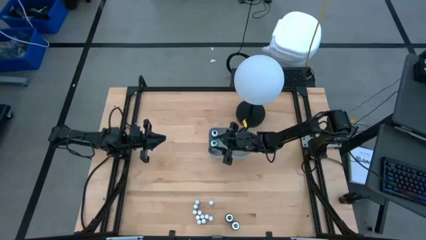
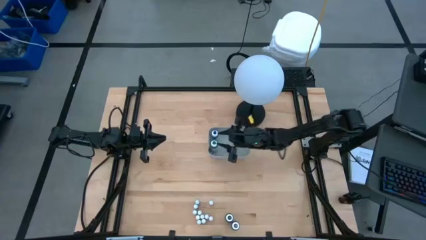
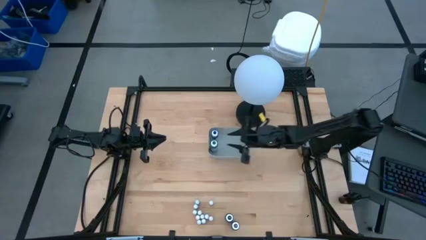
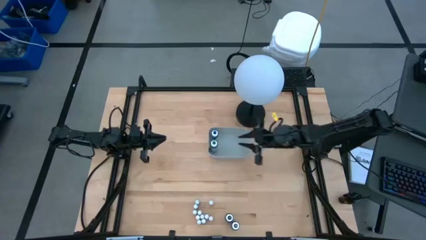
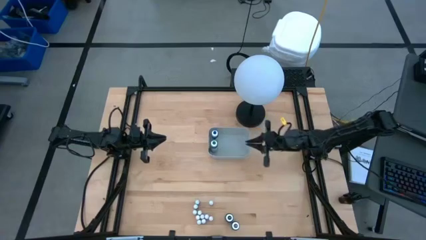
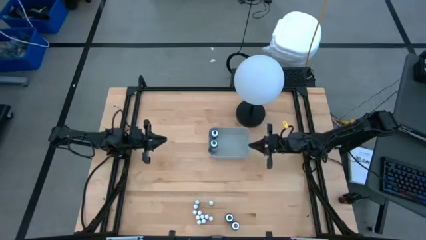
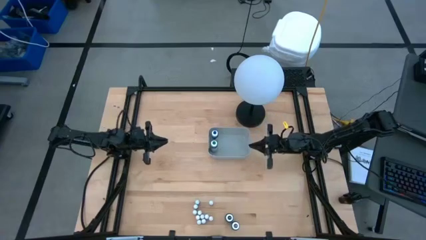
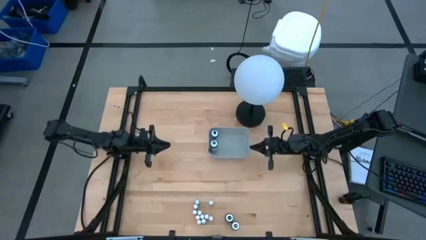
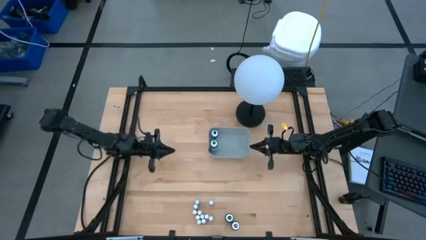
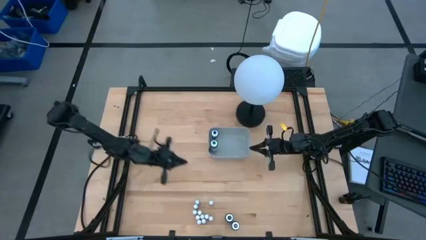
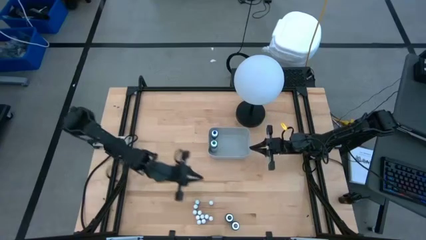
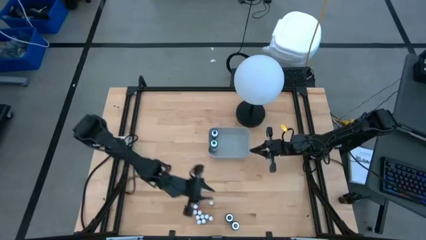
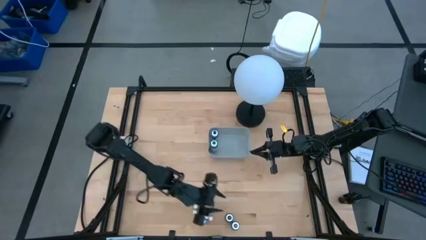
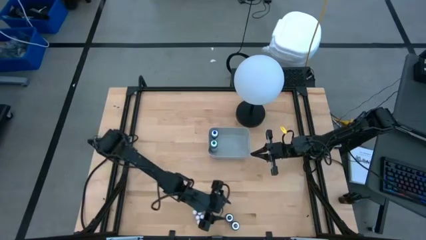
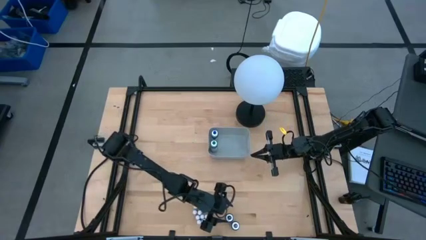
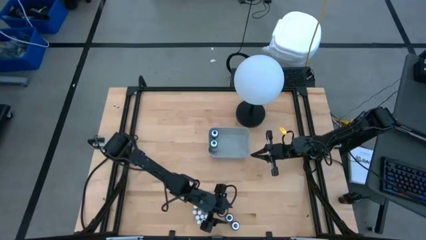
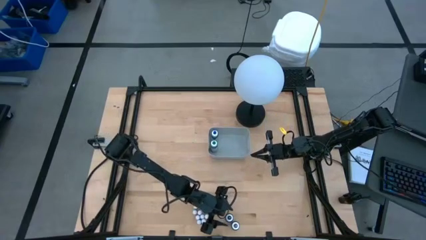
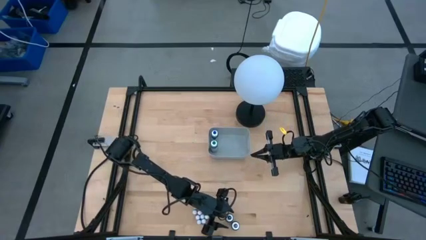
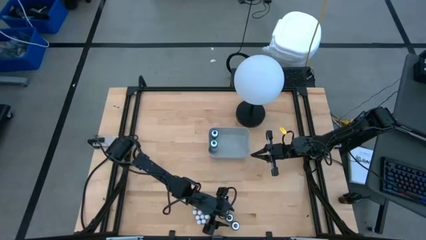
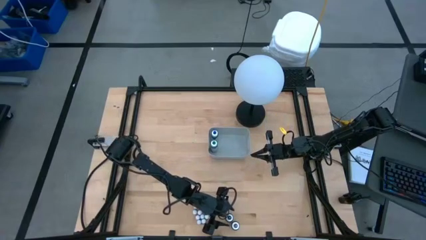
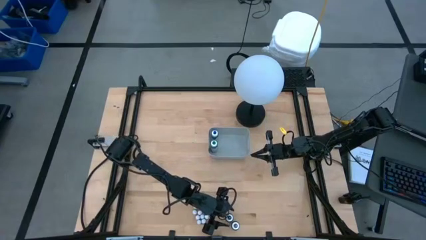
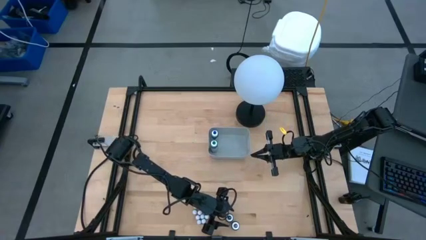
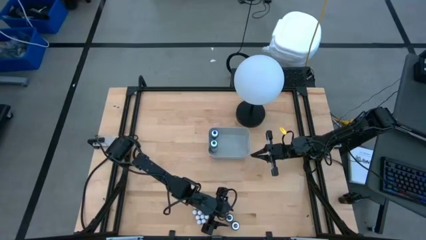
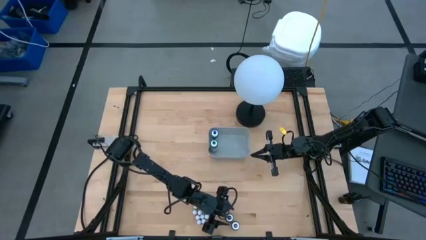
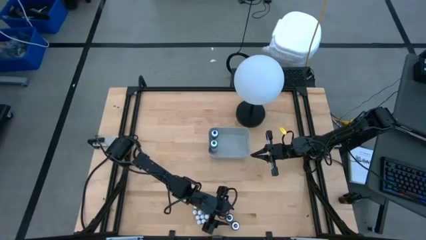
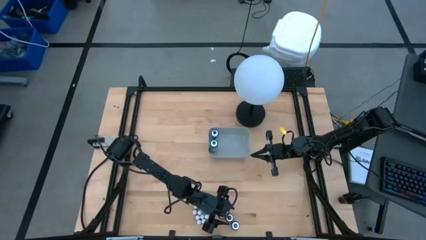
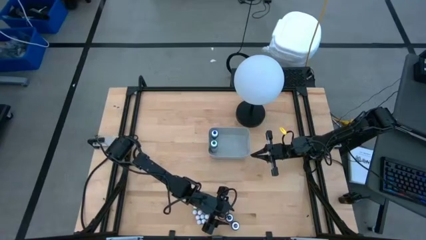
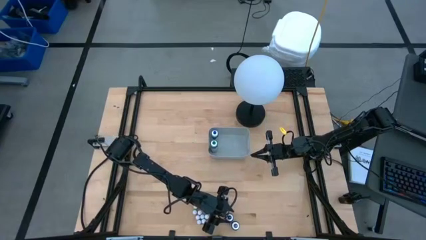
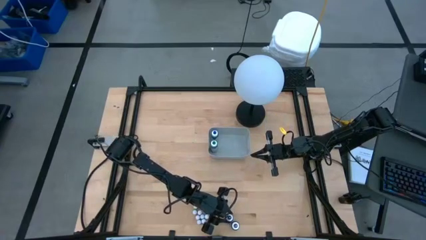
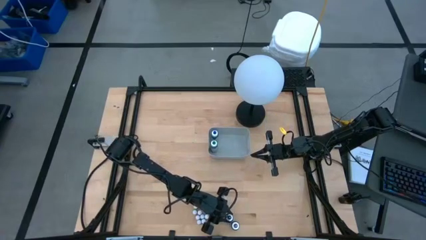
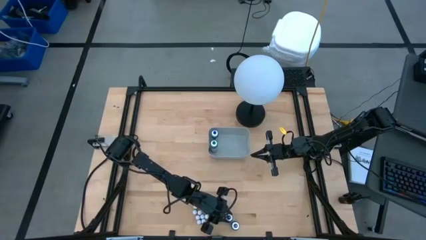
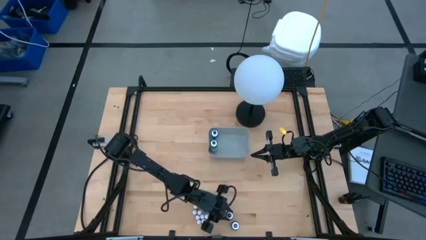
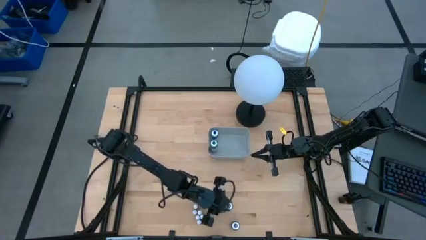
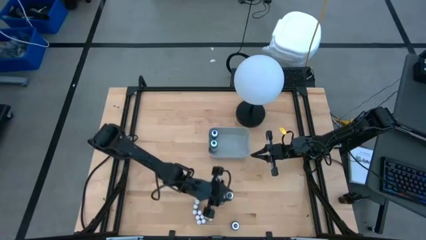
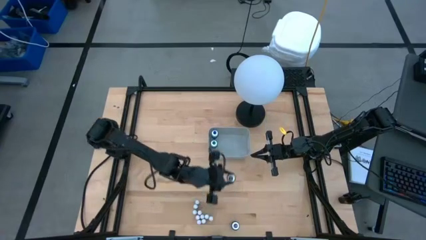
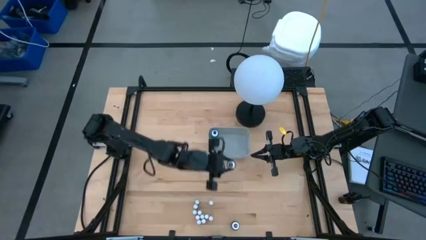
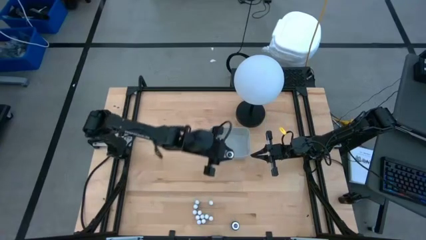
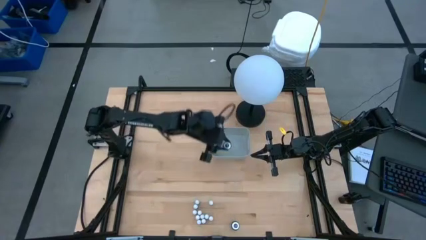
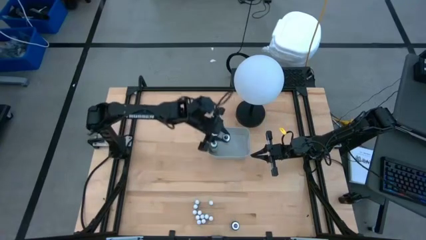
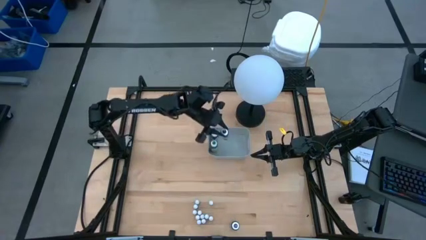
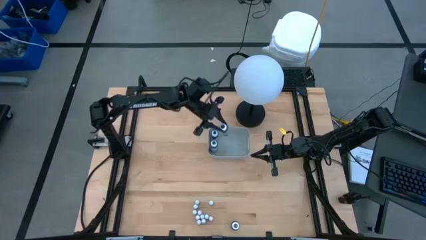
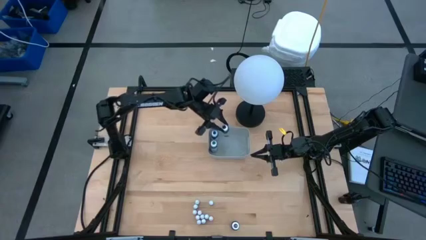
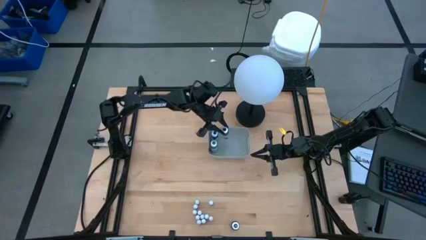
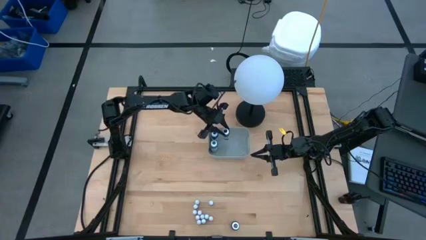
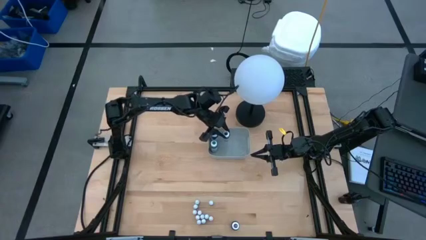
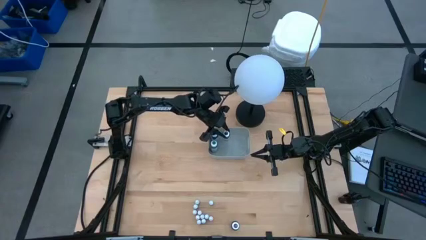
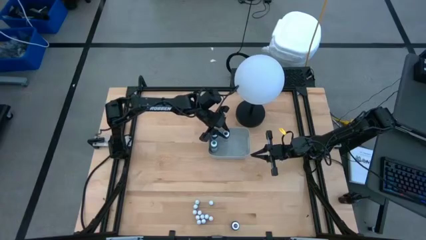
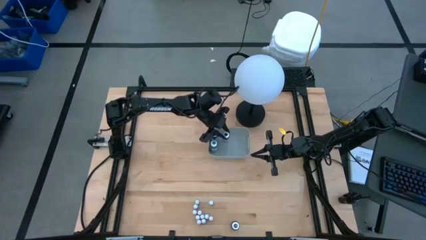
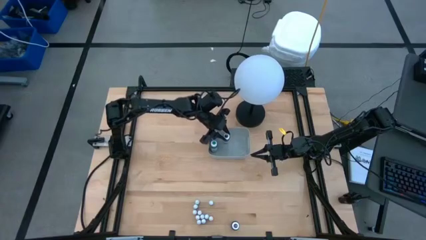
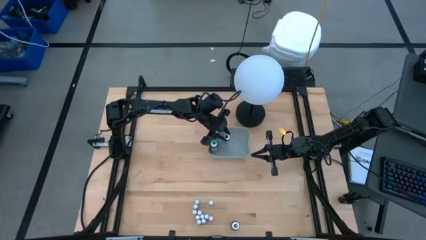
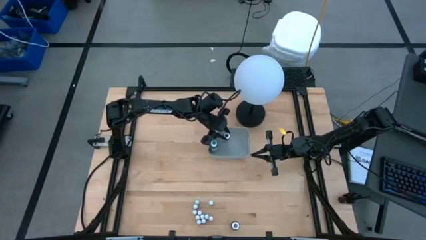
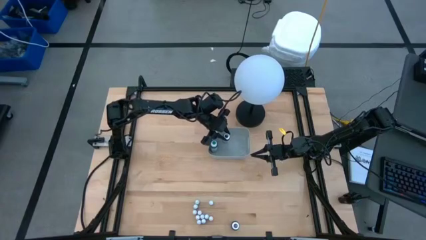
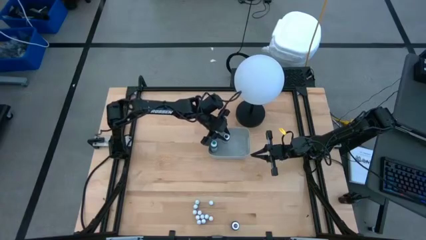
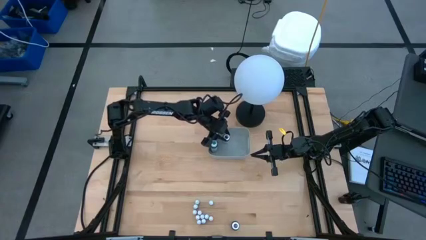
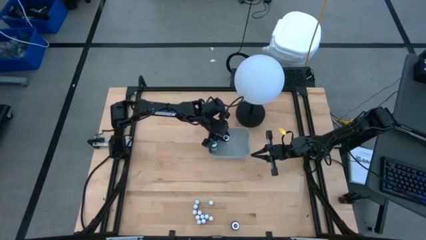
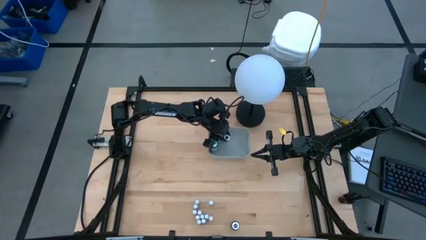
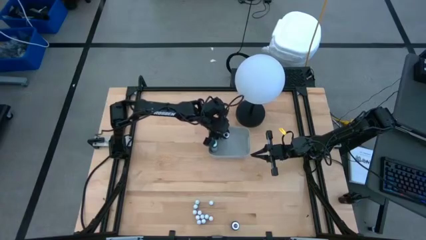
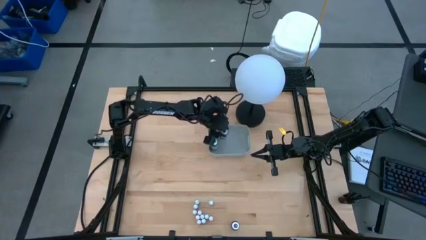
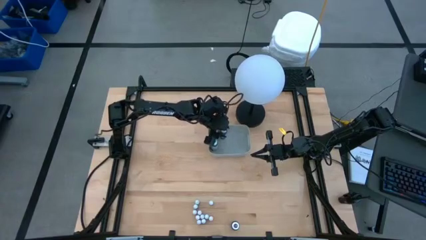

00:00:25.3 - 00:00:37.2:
Task: Pick & Place food coloring
Put the black food coloring bottle into the gray bin
